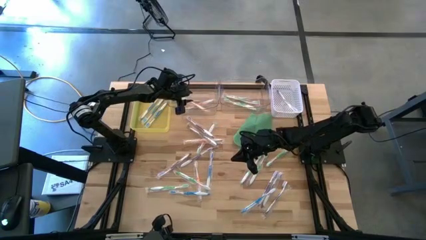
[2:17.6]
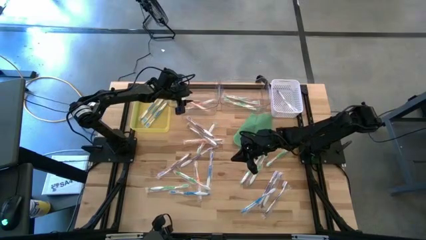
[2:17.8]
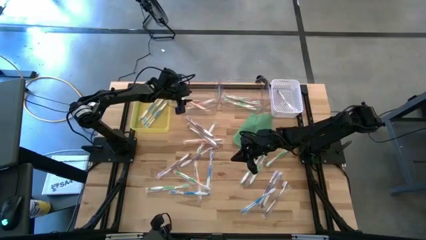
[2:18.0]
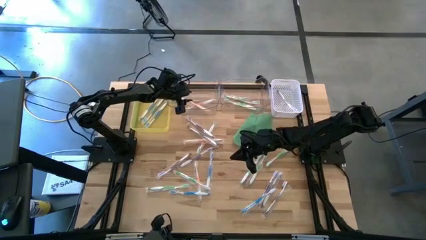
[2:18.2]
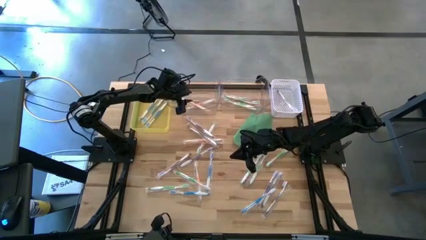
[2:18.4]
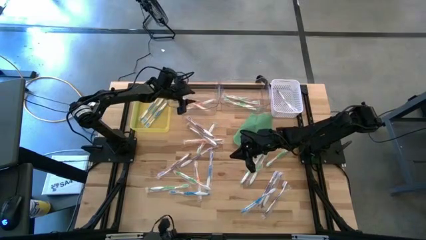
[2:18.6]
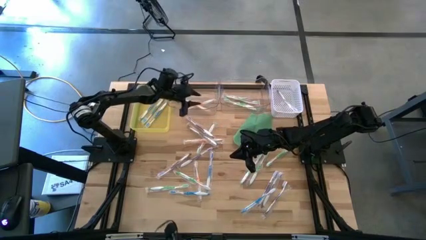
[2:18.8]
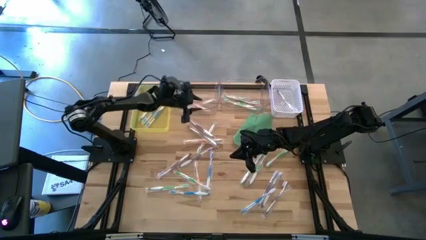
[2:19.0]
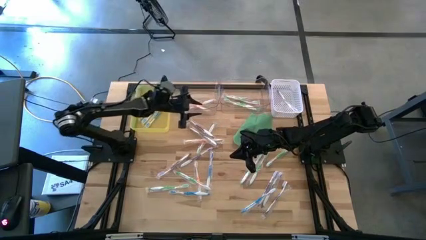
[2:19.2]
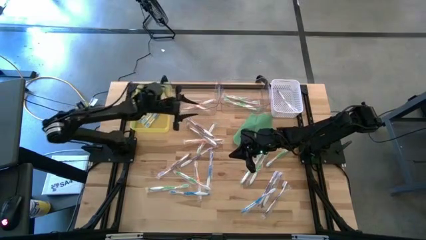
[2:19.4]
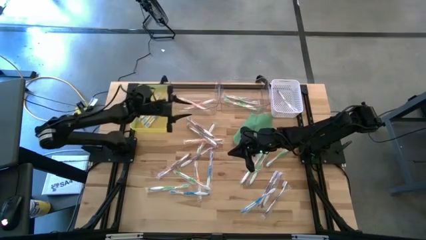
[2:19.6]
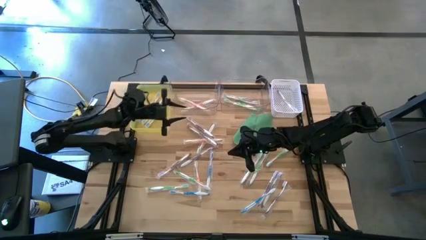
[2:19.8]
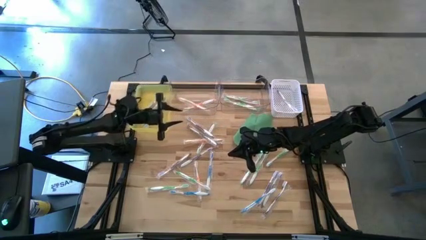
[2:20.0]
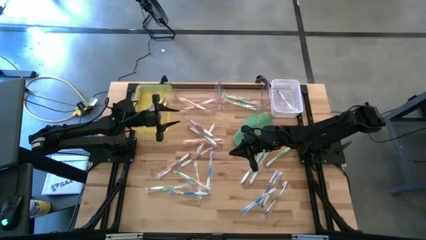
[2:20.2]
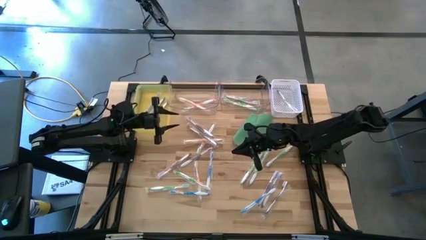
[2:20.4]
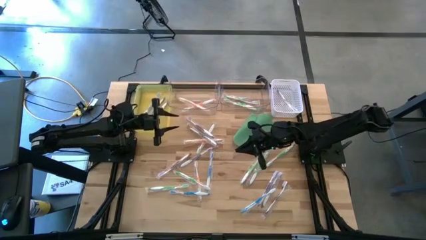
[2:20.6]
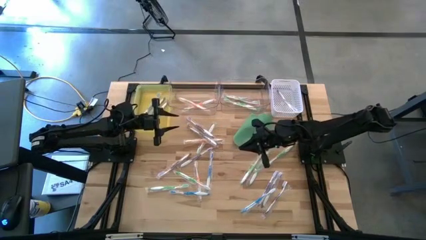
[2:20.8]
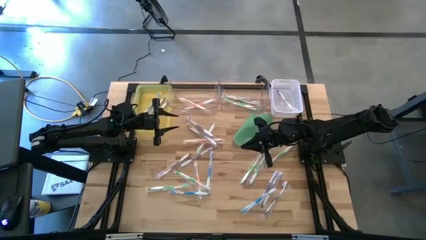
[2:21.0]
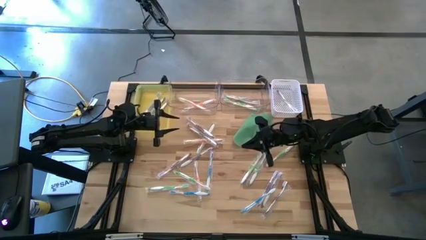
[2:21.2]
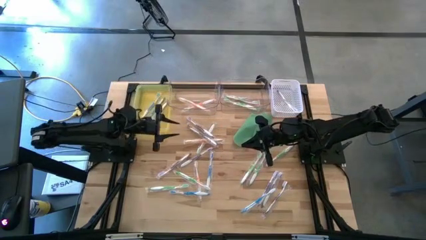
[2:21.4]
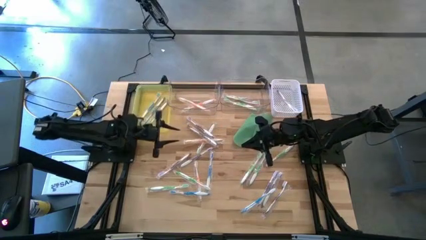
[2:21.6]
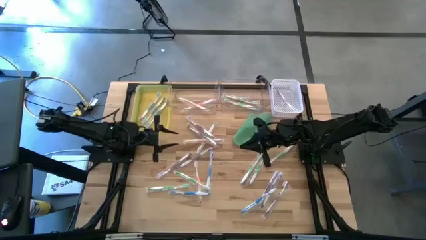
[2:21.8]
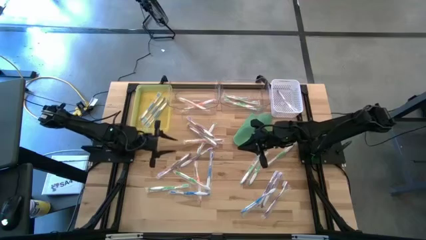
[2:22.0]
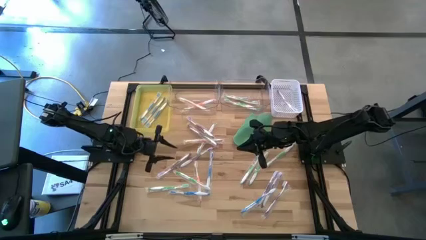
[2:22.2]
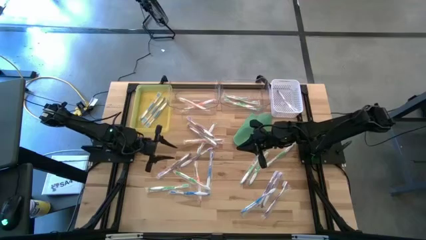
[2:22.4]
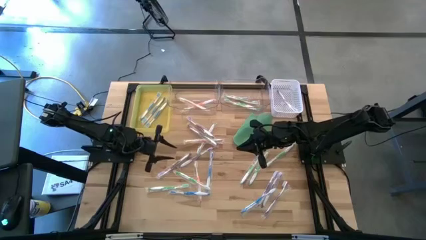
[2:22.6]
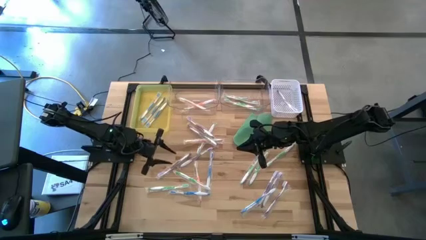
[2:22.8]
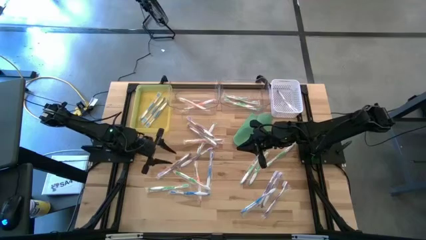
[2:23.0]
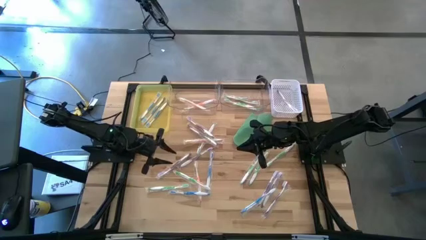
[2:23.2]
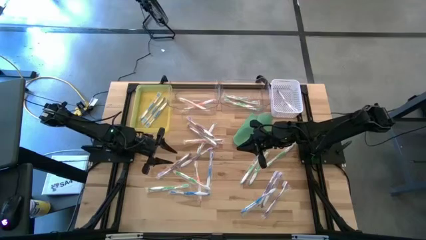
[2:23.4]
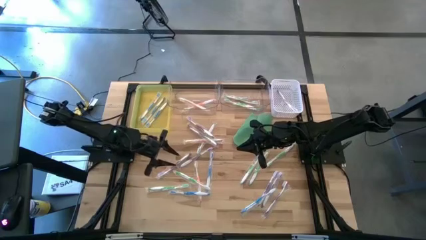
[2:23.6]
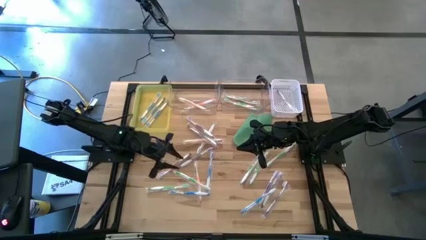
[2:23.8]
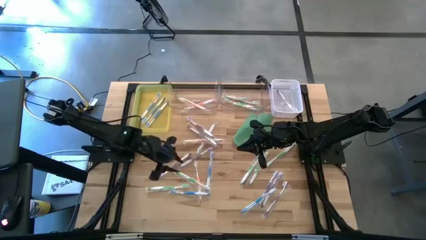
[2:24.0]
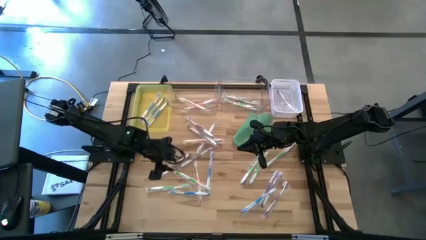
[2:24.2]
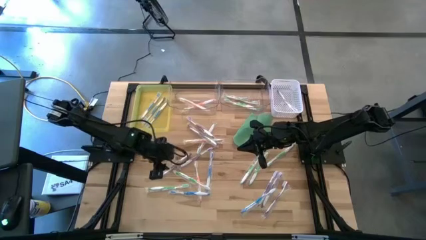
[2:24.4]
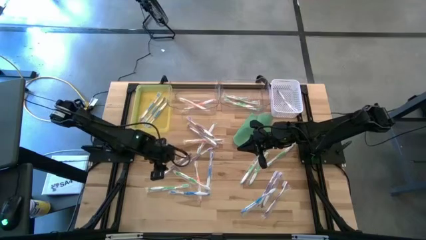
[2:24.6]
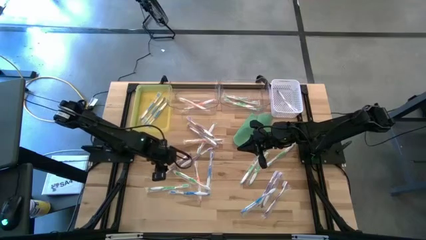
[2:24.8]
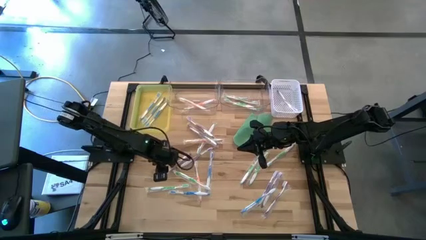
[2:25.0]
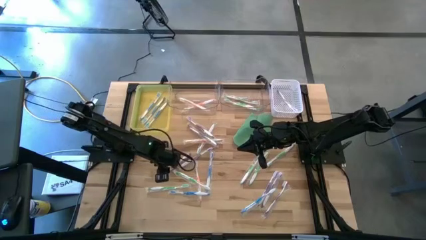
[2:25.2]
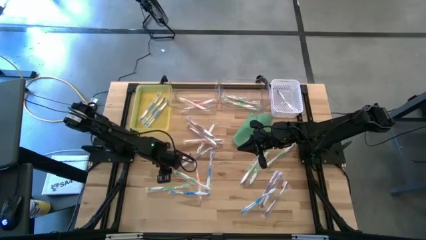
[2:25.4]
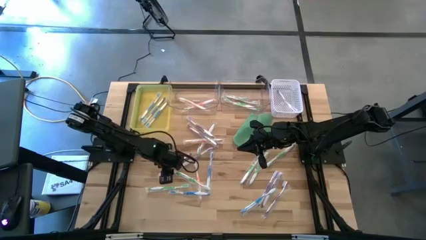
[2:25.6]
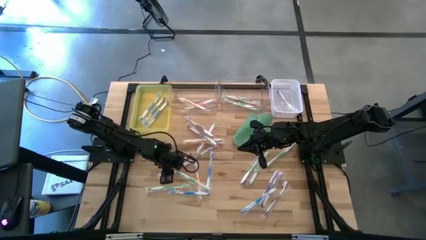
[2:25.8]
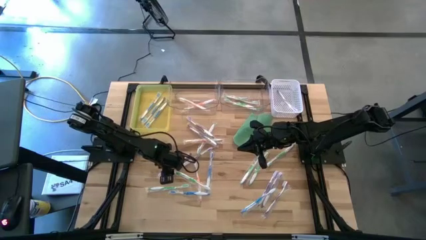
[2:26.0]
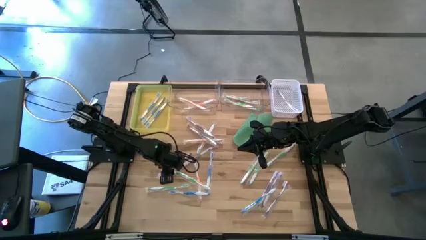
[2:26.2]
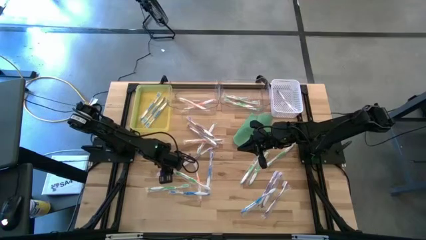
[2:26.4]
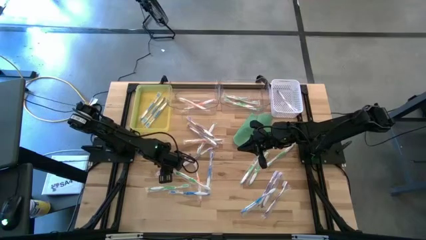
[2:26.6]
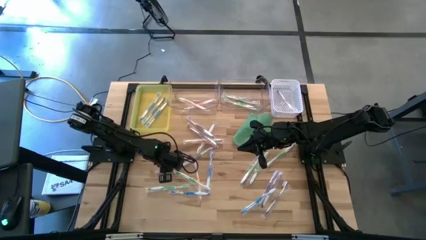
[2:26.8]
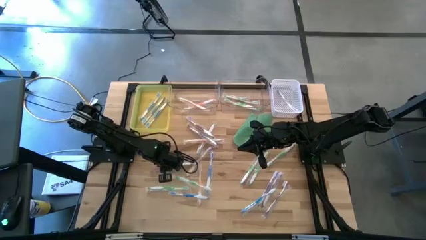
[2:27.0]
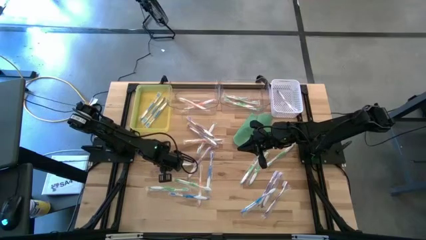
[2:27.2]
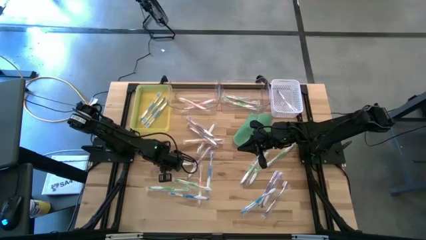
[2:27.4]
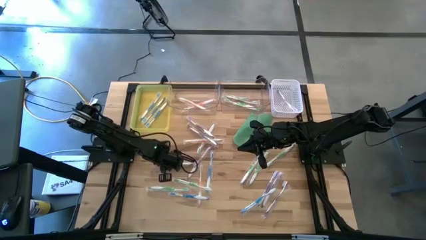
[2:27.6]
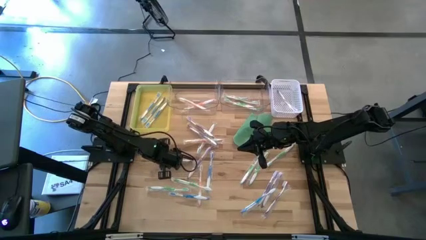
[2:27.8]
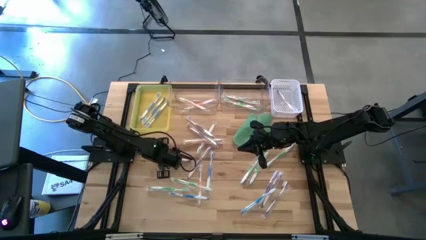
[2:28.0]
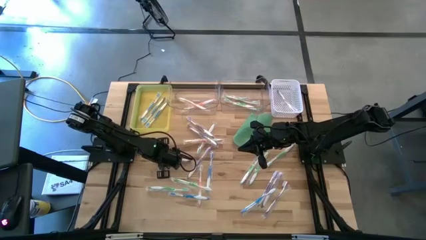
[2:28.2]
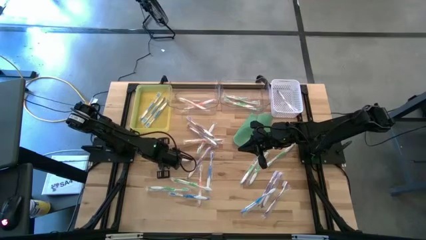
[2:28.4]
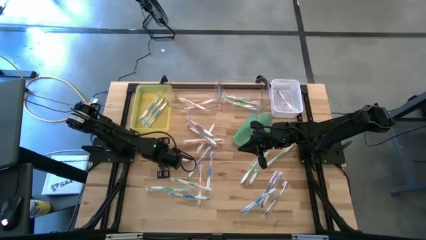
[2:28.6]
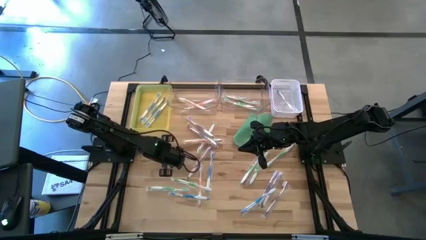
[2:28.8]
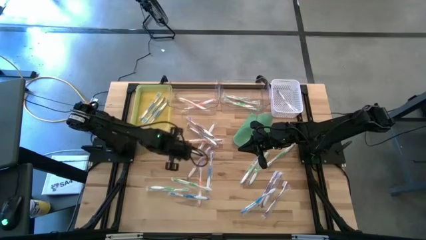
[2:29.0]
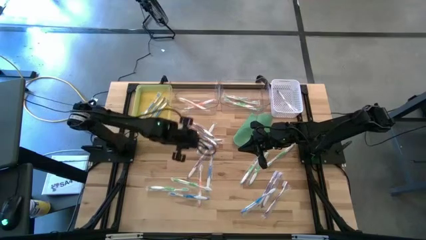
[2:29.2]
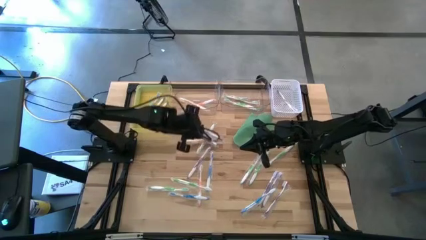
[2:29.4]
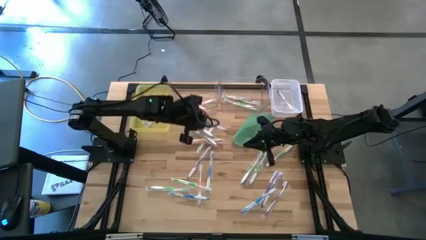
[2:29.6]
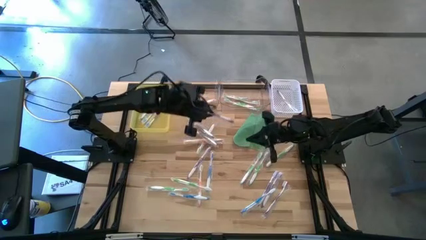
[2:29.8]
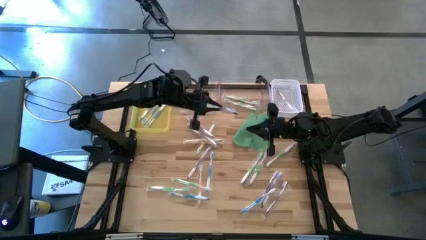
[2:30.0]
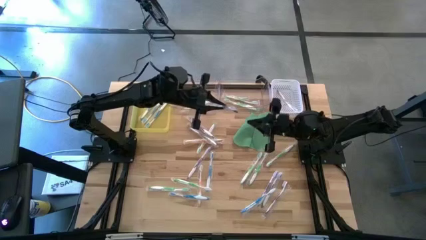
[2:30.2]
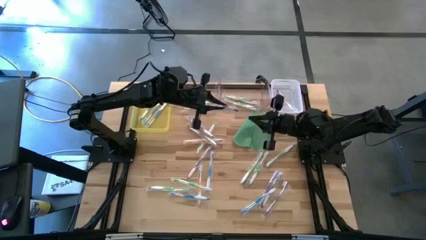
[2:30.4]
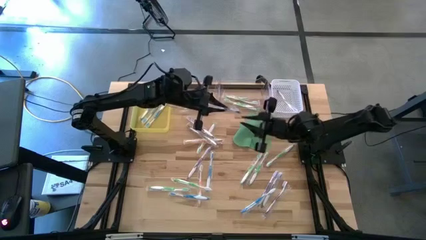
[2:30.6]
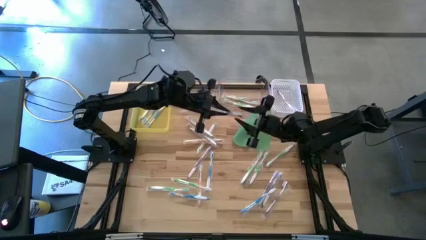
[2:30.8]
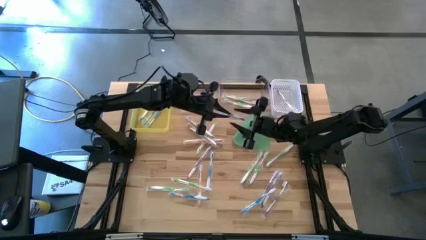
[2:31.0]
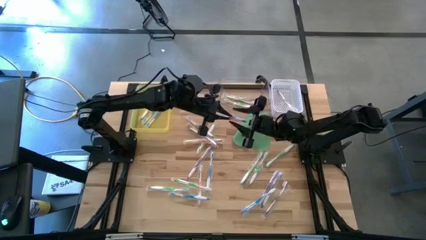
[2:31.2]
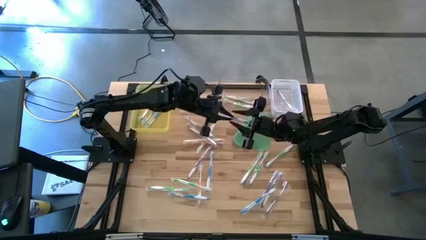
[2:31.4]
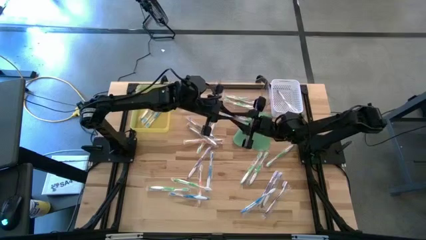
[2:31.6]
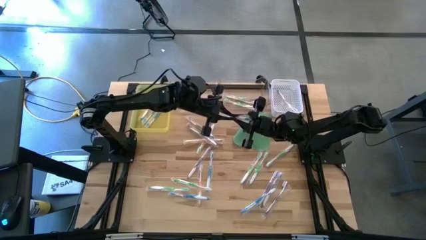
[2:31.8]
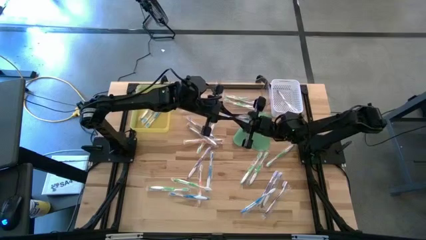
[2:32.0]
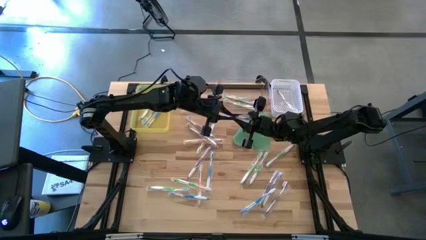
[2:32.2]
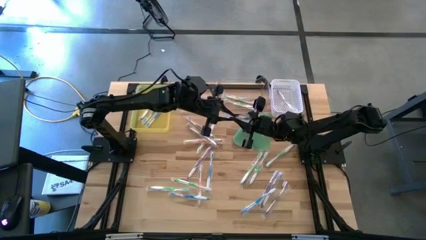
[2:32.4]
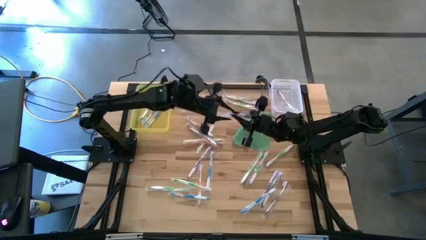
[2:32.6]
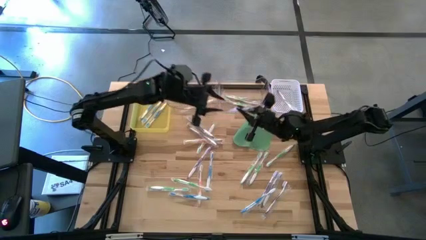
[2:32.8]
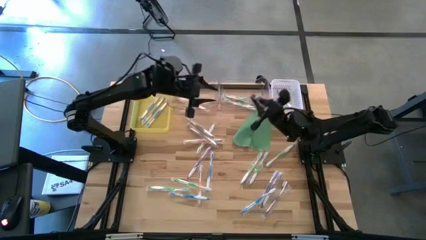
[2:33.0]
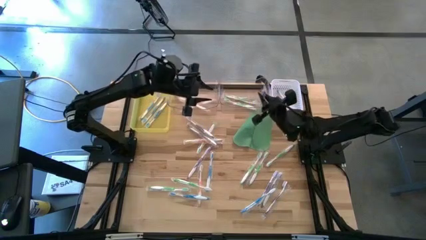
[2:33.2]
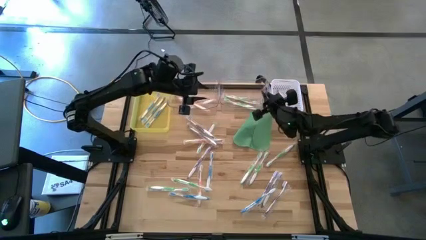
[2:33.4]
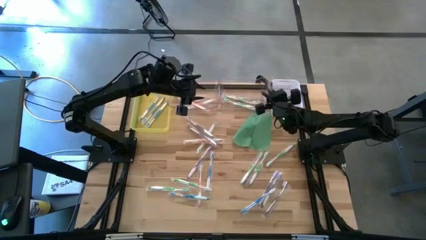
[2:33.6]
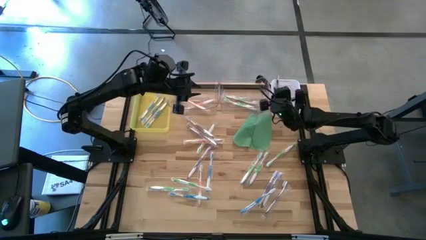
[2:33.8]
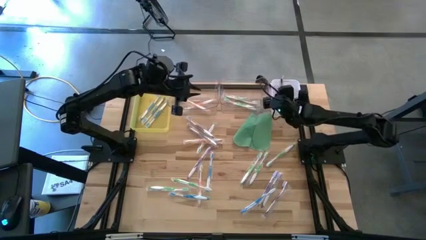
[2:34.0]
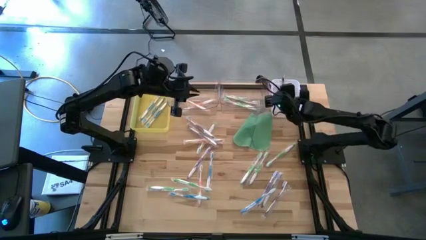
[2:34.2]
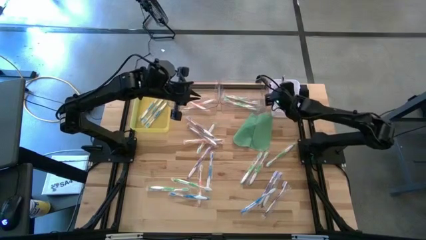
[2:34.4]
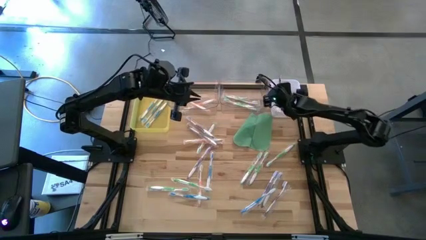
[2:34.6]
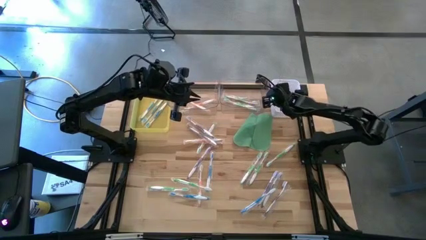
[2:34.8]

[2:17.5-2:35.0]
Task: Pick & Place Toothbrushes
Put the purple toothbrush into the white bin
